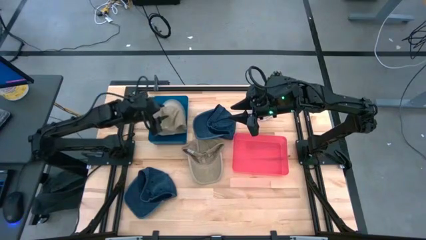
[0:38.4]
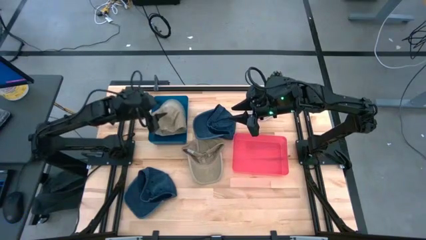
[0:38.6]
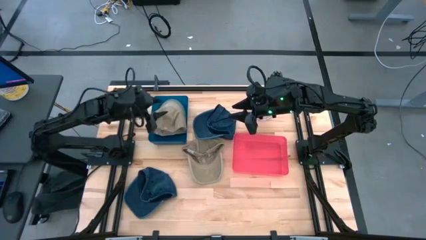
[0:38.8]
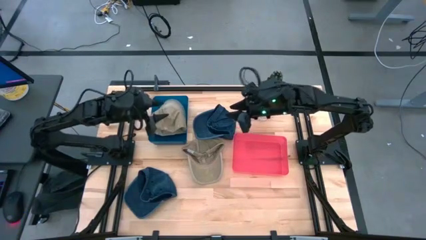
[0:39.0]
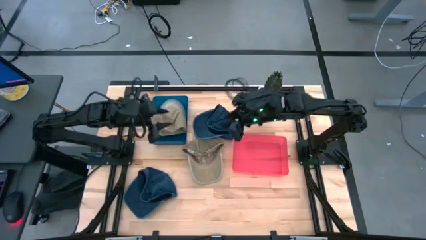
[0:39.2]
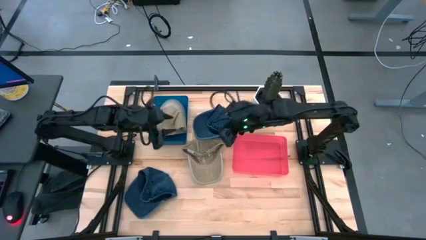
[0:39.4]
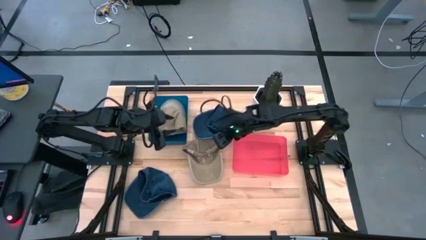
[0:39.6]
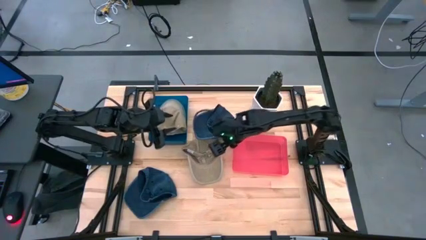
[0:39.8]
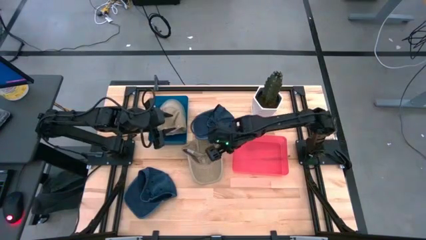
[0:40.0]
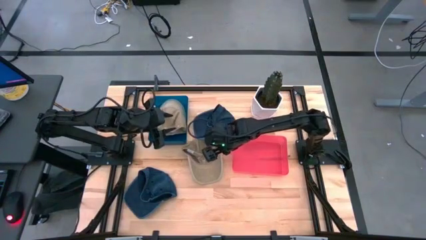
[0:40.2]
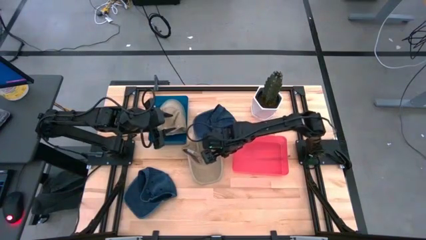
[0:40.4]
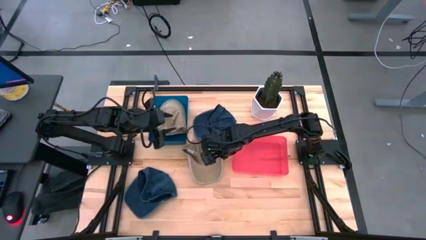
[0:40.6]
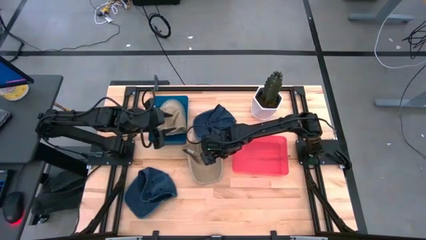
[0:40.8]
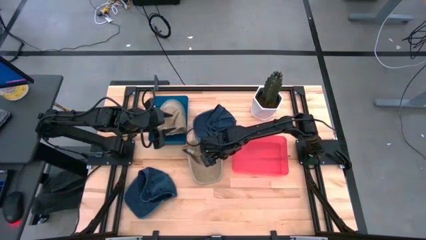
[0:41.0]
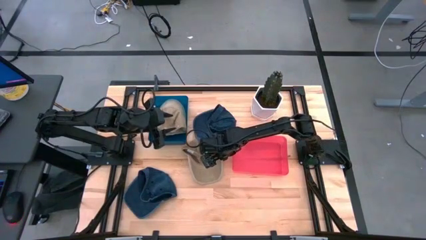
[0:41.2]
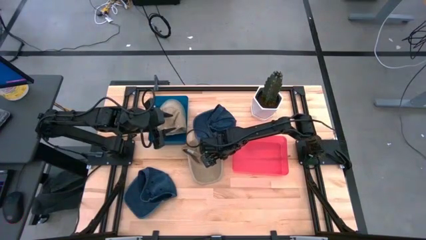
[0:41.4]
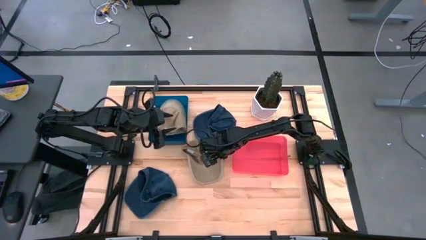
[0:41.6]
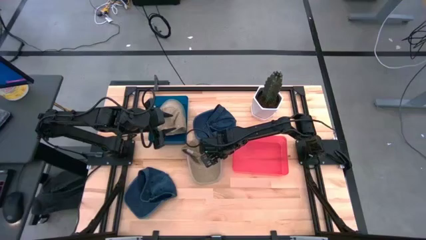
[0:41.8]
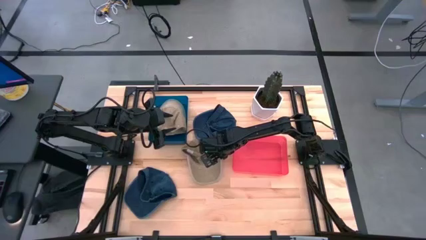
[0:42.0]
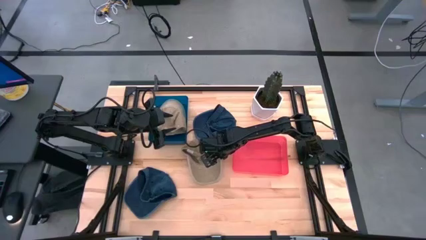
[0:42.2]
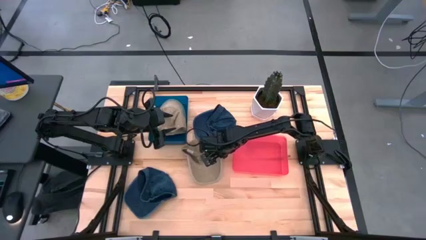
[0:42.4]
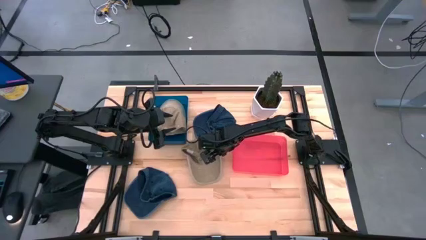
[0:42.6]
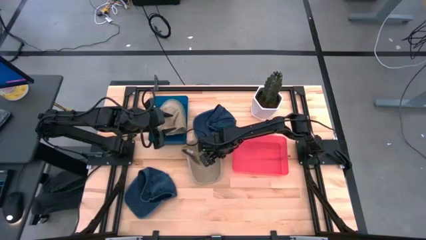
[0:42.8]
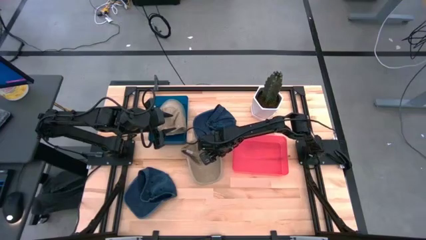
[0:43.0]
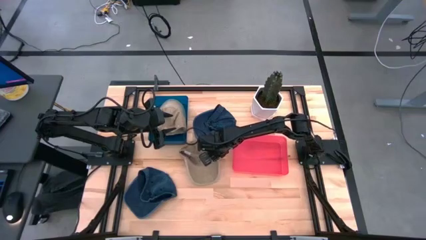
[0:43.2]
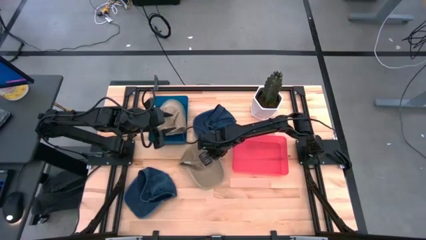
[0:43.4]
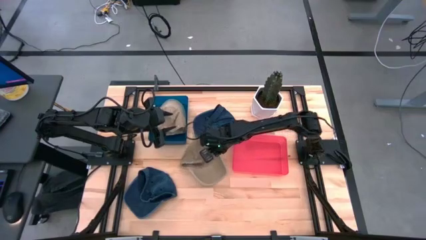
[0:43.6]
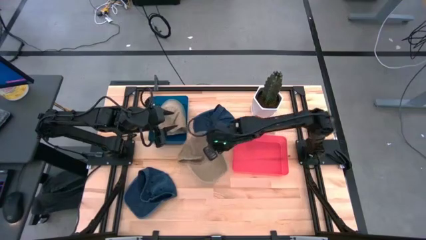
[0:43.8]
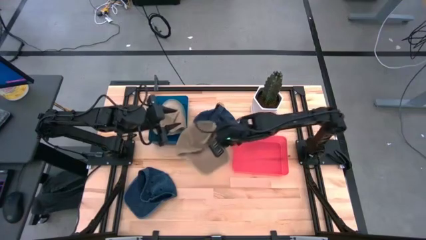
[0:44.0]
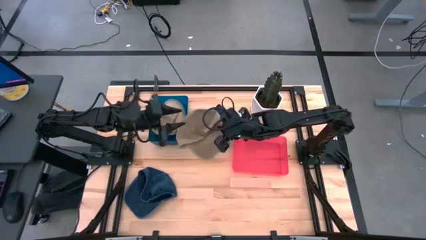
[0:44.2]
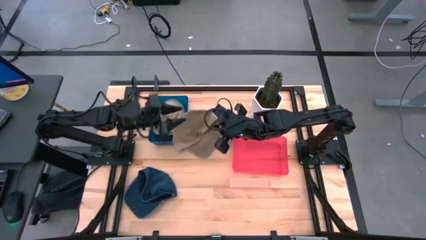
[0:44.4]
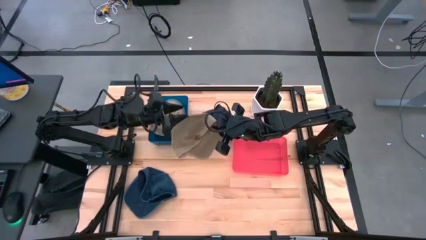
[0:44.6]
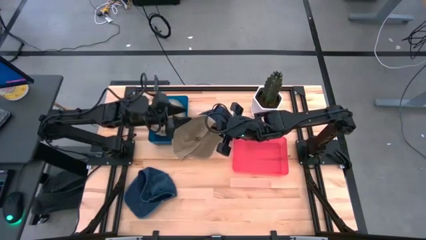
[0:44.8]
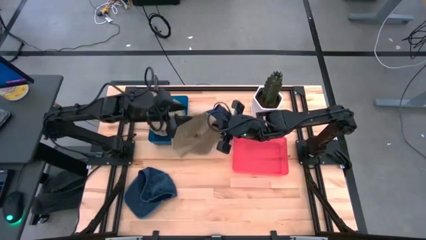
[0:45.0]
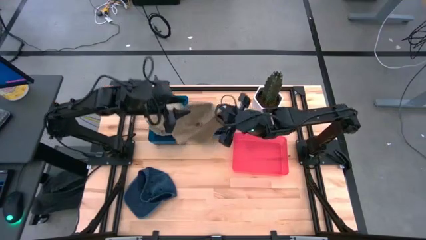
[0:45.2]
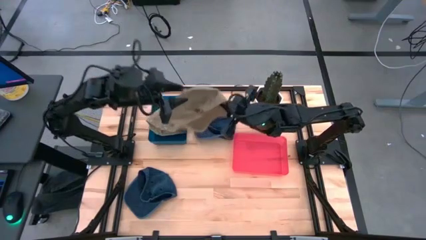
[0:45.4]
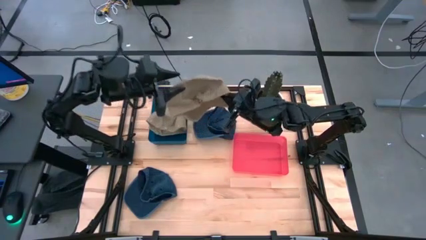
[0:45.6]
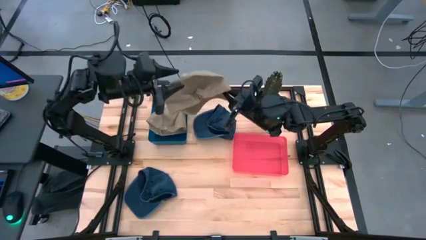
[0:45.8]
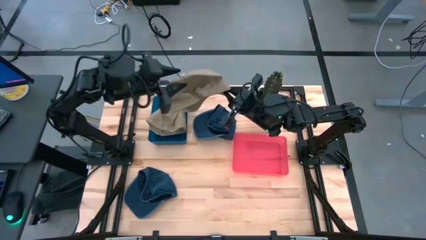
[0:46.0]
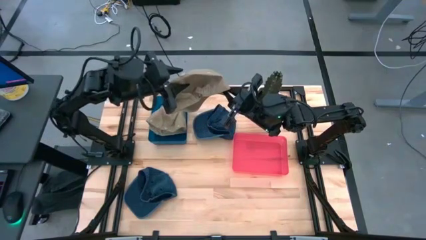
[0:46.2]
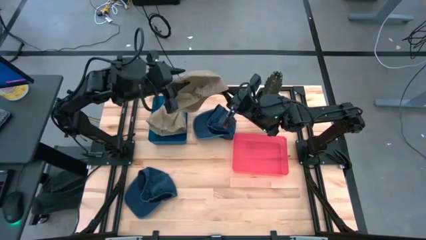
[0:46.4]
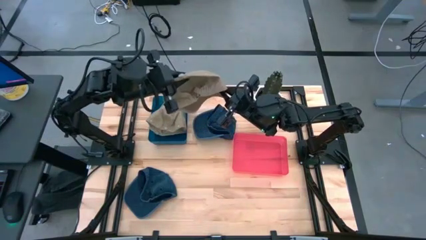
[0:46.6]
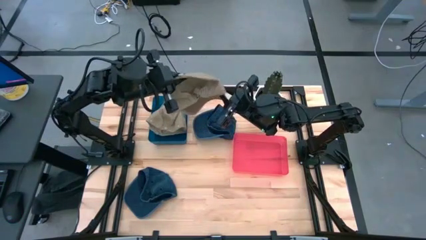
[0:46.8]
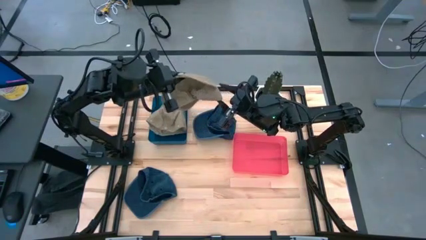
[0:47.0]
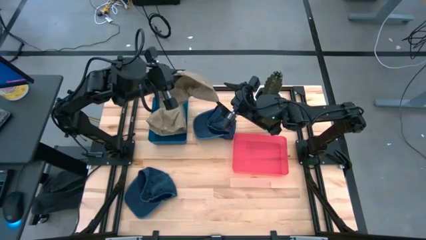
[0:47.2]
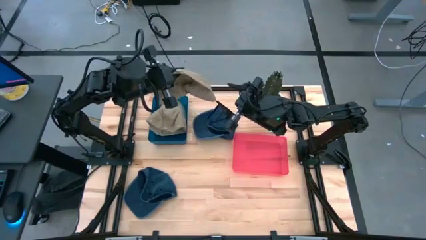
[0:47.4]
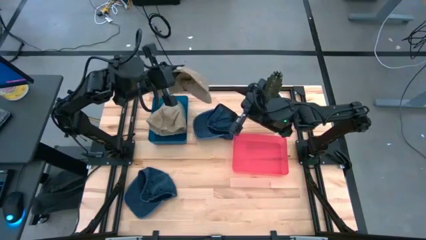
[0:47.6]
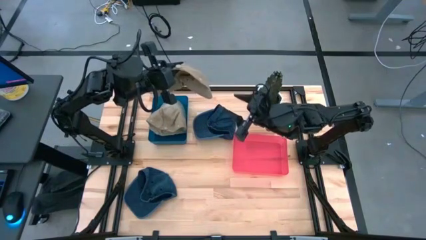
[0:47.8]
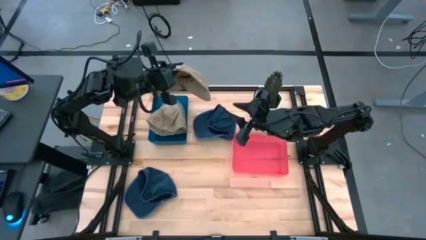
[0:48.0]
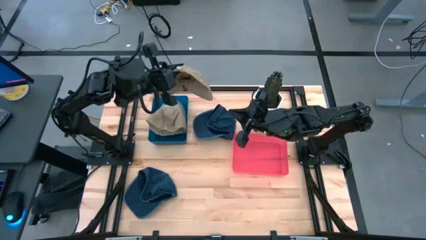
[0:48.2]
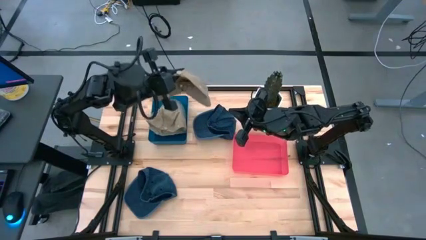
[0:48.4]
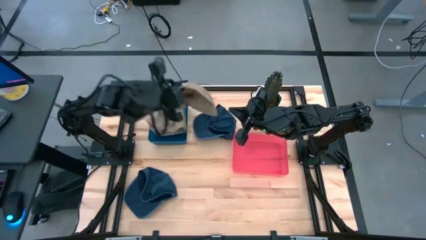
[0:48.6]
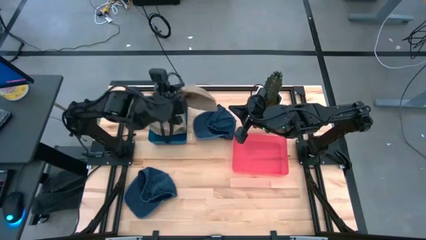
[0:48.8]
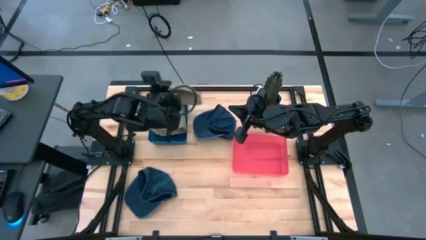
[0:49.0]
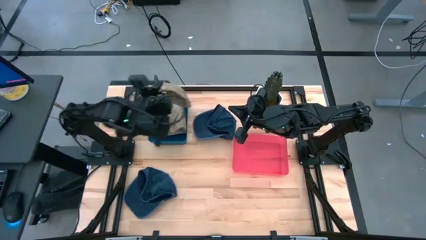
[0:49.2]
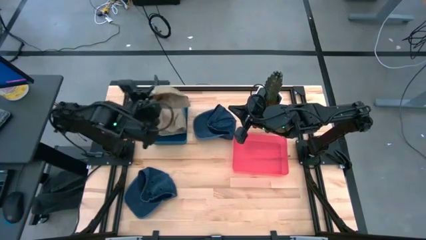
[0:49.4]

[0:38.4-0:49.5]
Task: Pick & Place hat
Put the brown cap into the blue bin
